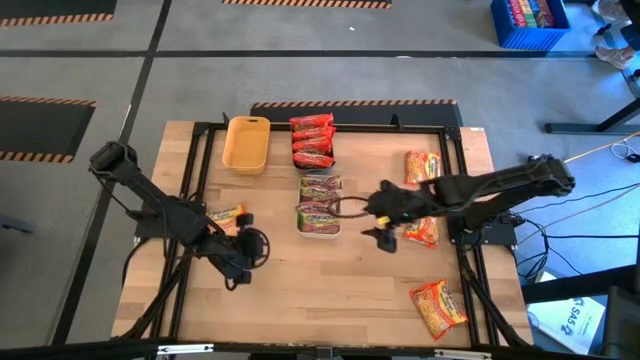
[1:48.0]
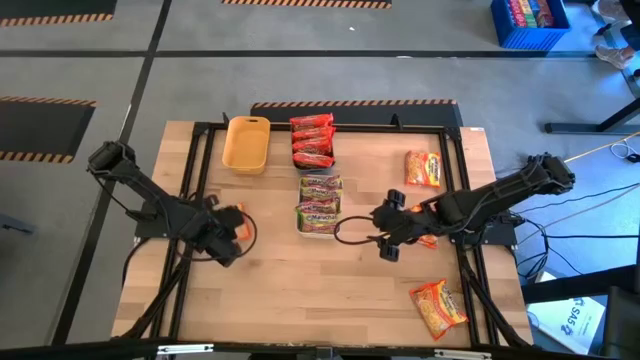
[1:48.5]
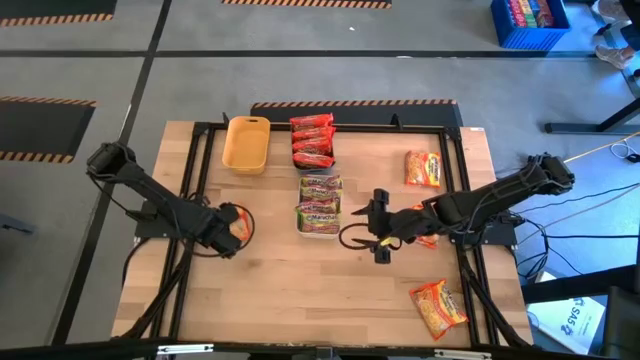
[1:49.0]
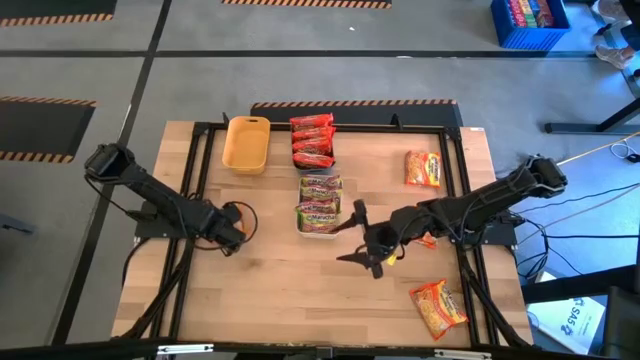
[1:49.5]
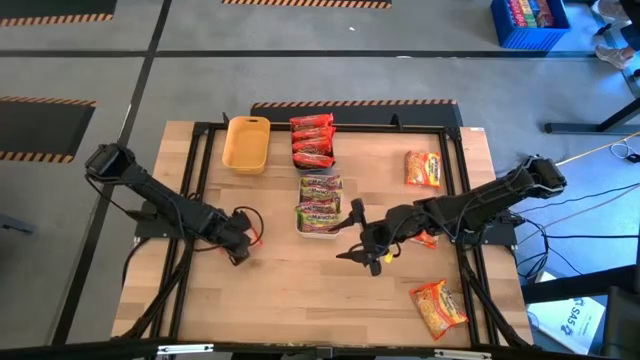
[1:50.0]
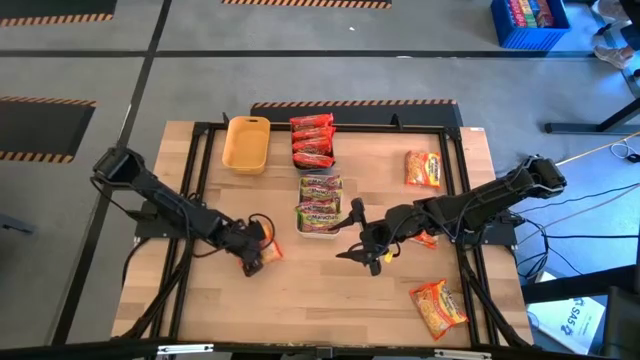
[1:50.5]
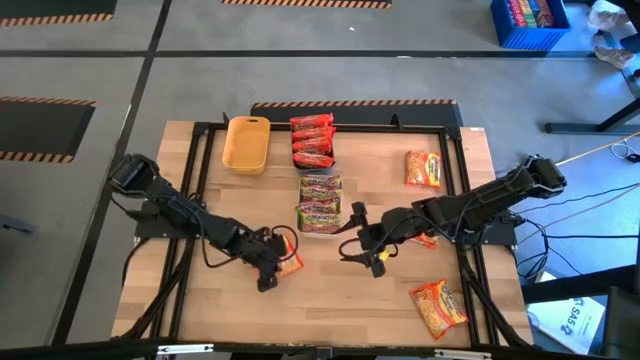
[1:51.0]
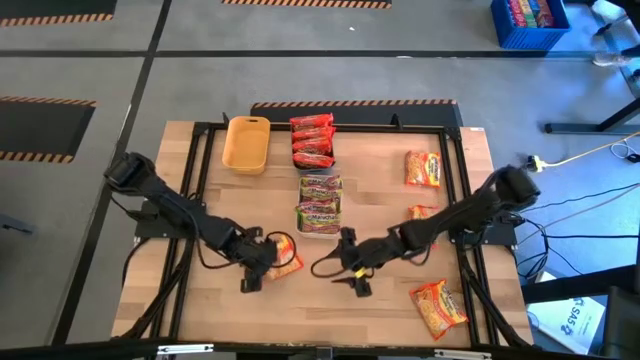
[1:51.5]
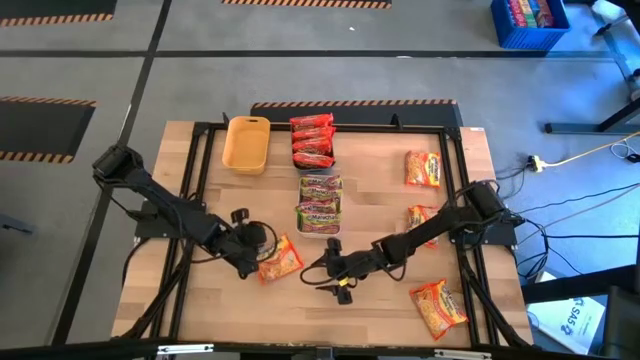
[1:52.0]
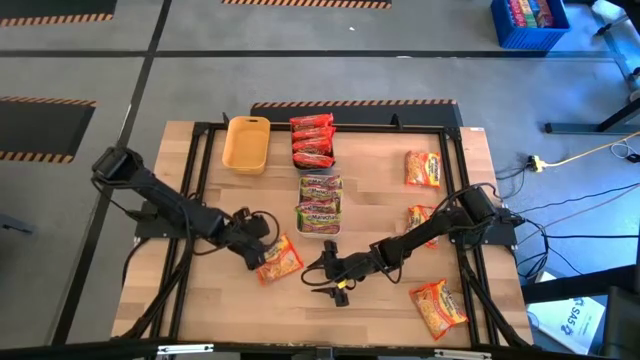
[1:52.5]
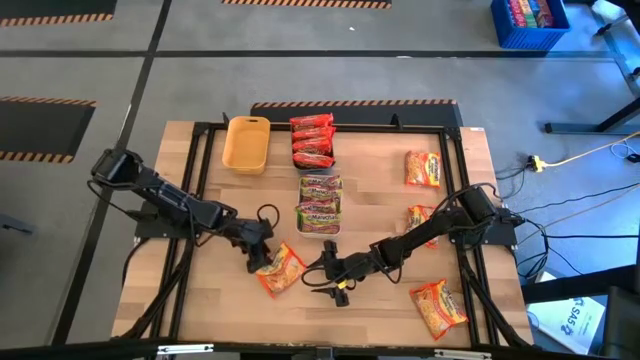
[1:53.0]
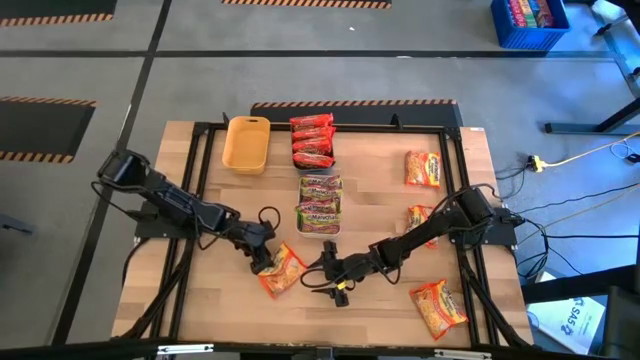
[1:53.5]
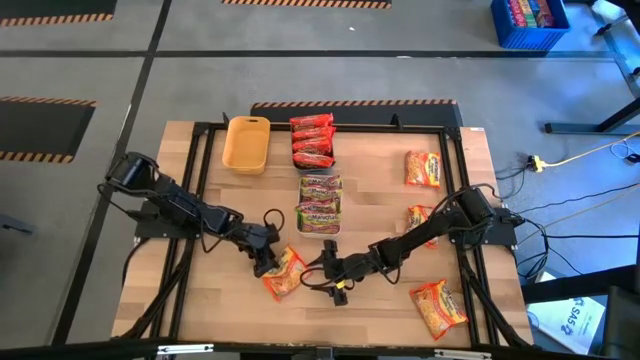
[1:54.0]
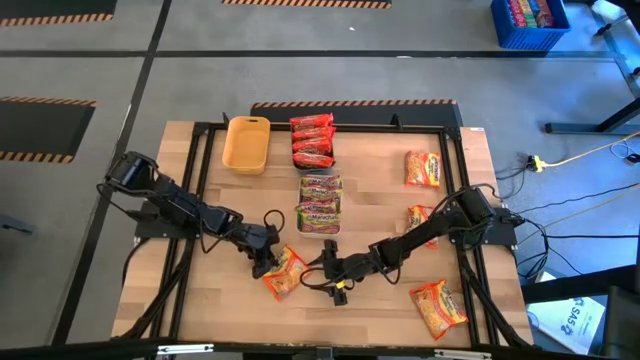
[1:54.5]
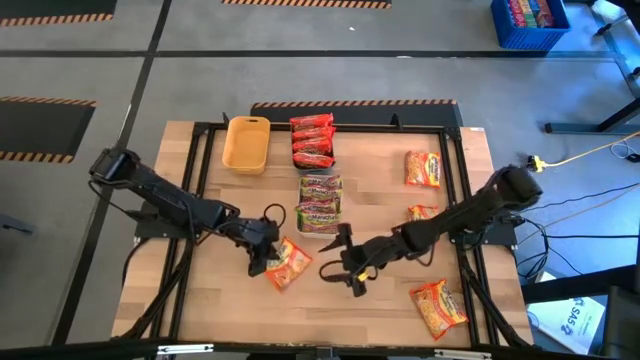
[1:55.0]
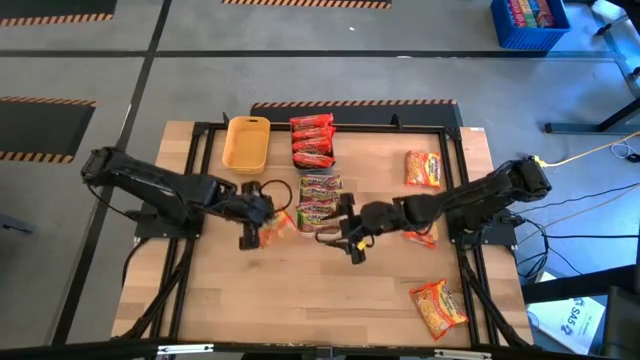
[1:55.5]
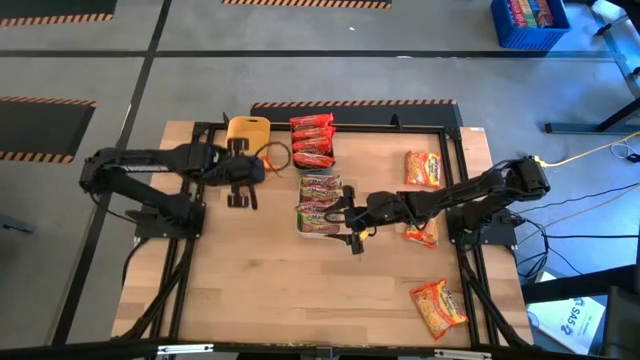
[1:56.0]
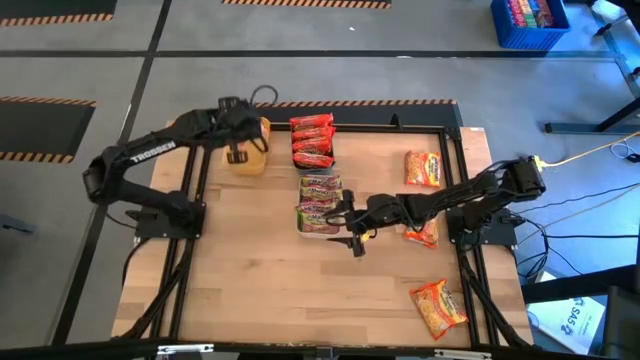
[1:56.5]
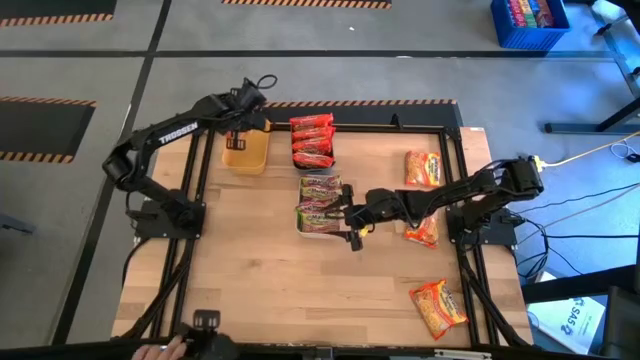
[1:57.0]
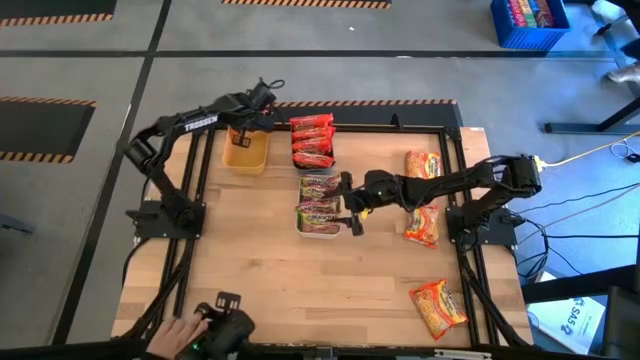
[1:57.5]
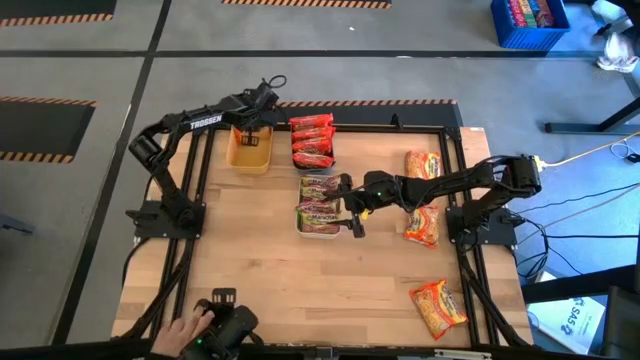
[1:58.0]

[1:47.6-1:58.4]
Task: Sort Maruchan noodles
Put the orange noodle pack into the yellow bin

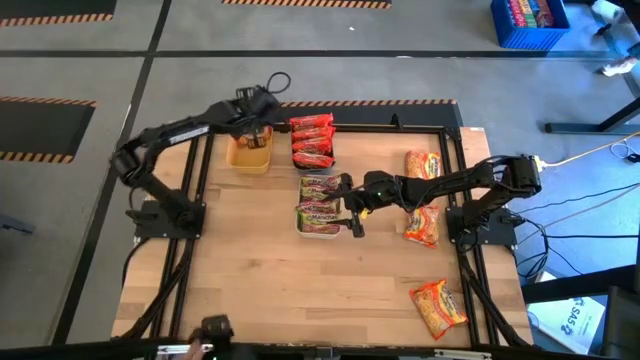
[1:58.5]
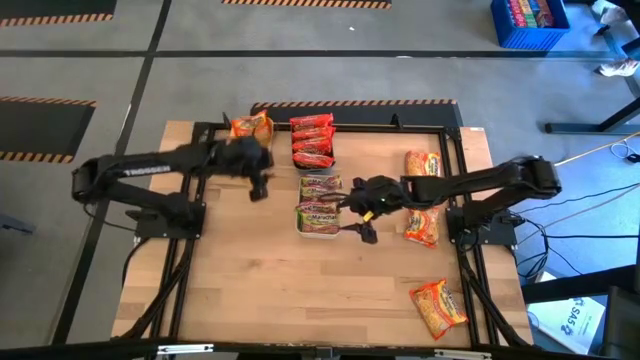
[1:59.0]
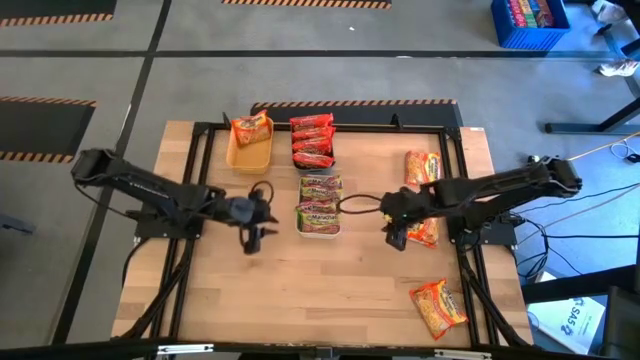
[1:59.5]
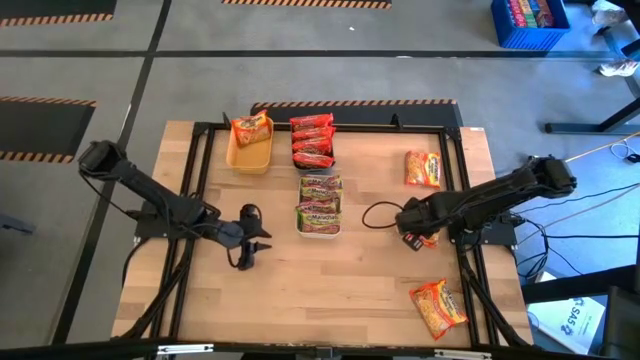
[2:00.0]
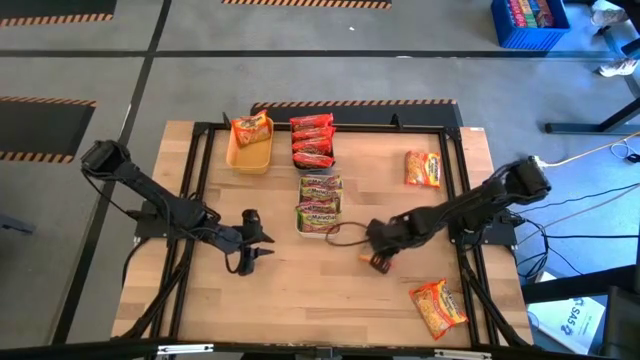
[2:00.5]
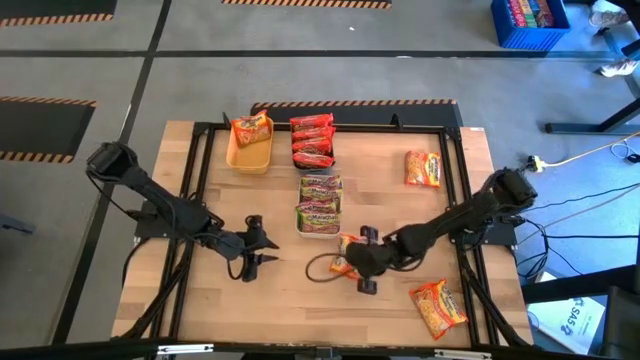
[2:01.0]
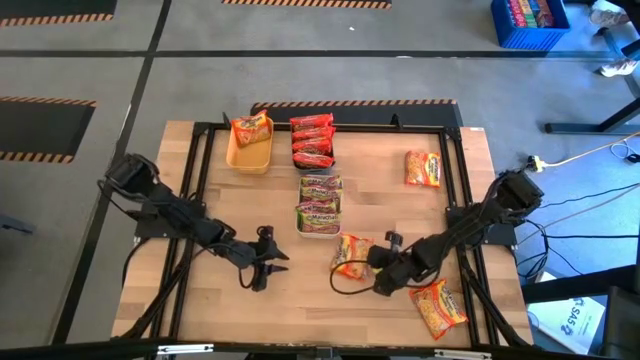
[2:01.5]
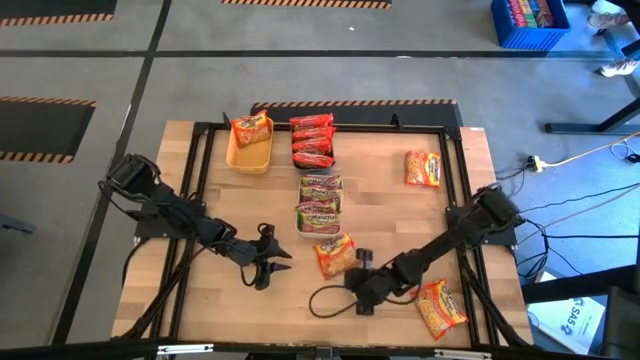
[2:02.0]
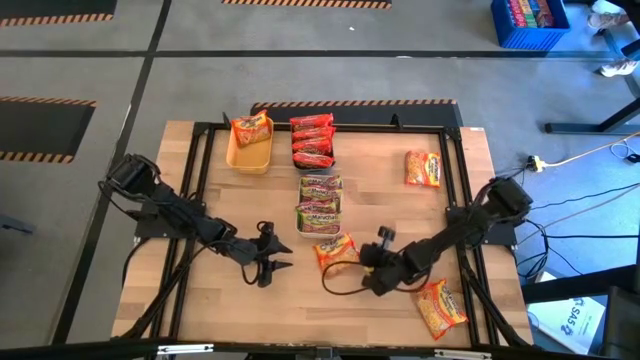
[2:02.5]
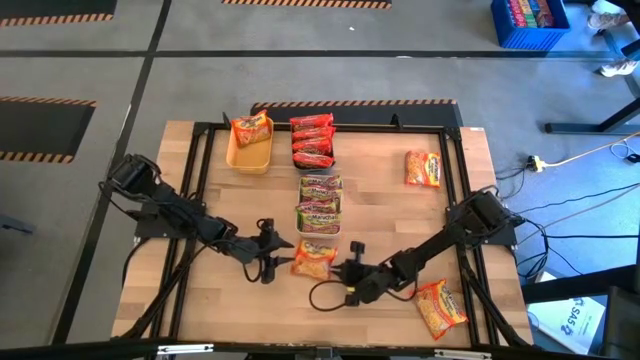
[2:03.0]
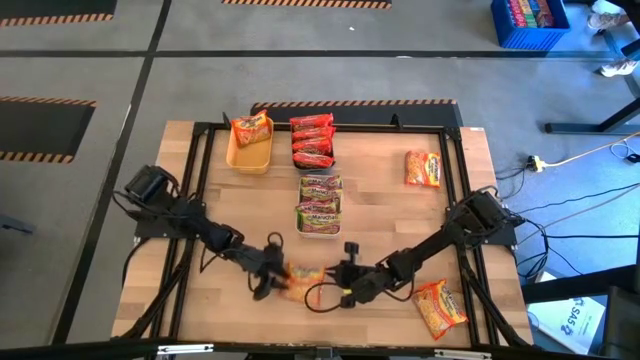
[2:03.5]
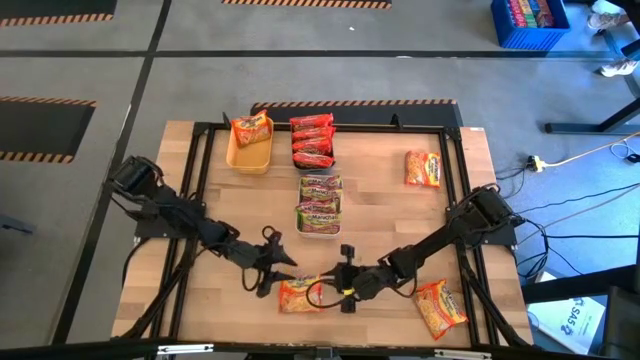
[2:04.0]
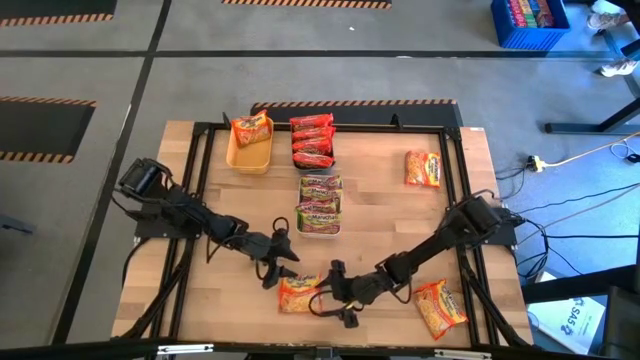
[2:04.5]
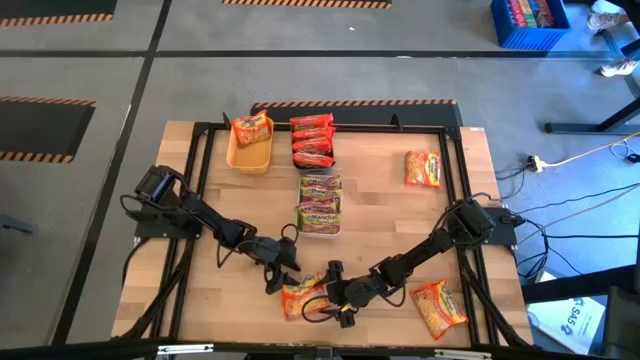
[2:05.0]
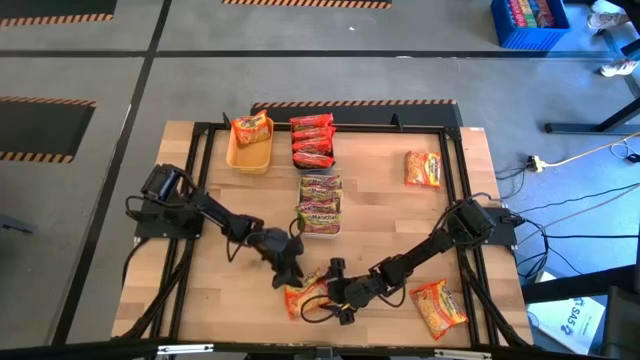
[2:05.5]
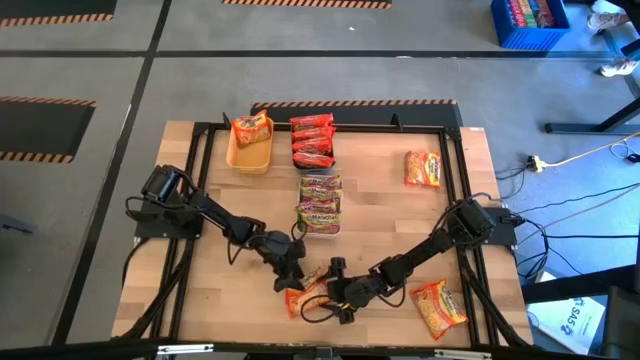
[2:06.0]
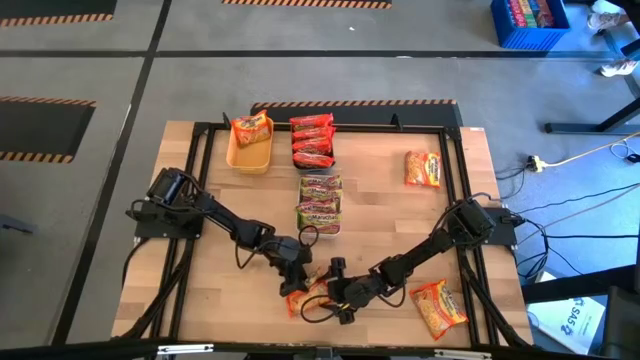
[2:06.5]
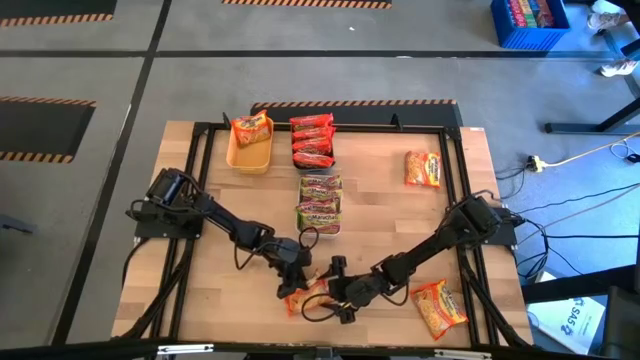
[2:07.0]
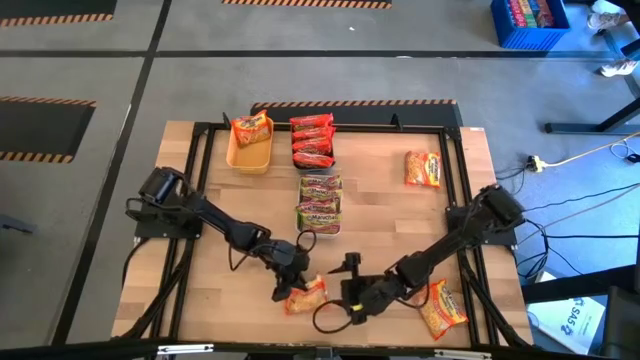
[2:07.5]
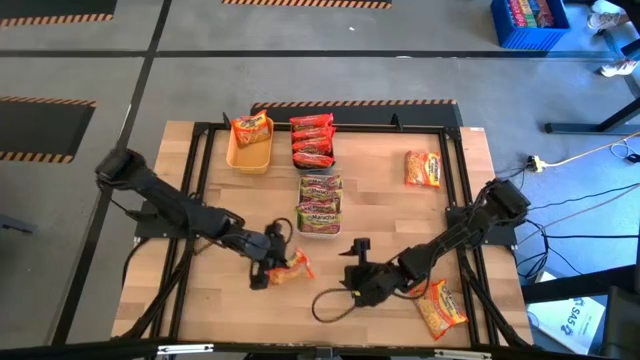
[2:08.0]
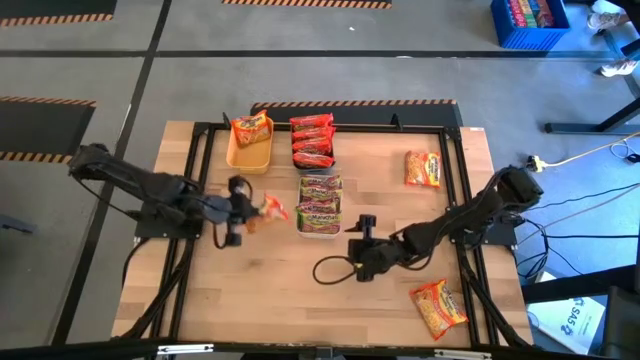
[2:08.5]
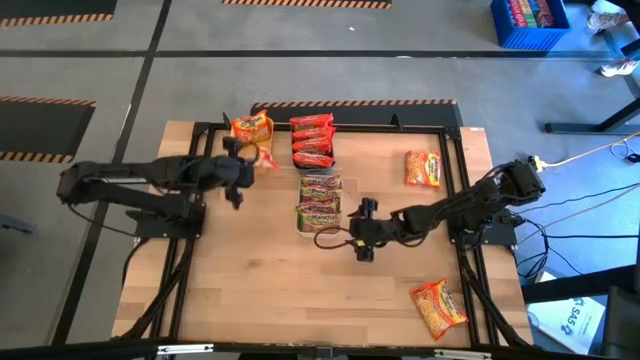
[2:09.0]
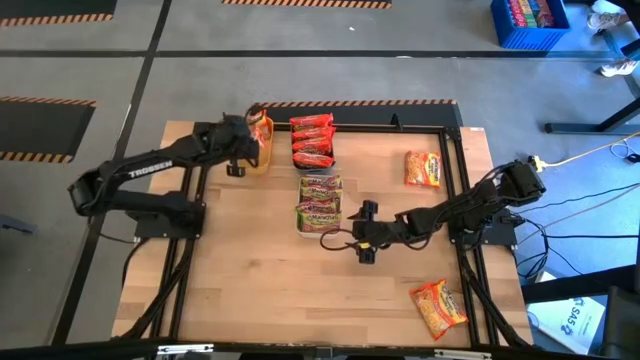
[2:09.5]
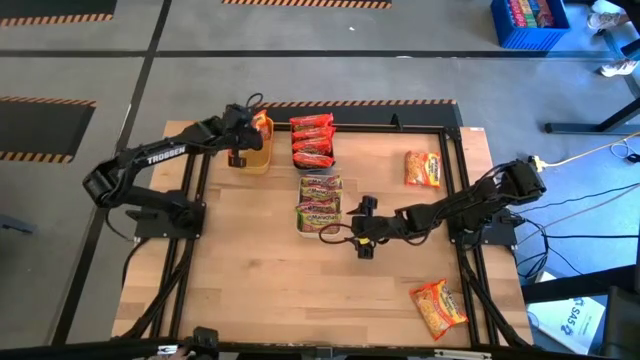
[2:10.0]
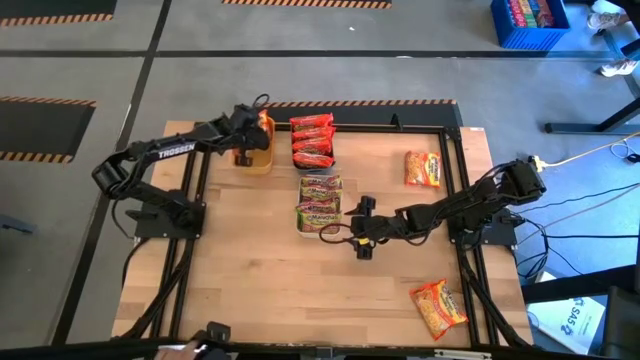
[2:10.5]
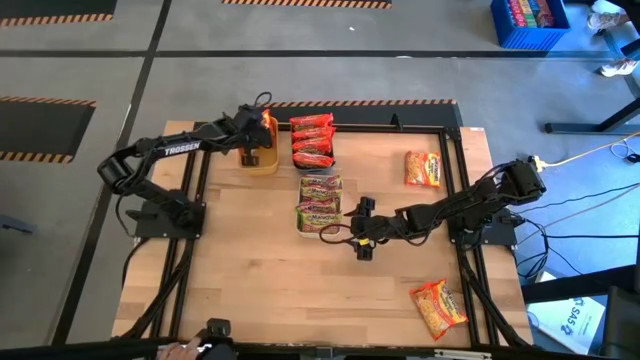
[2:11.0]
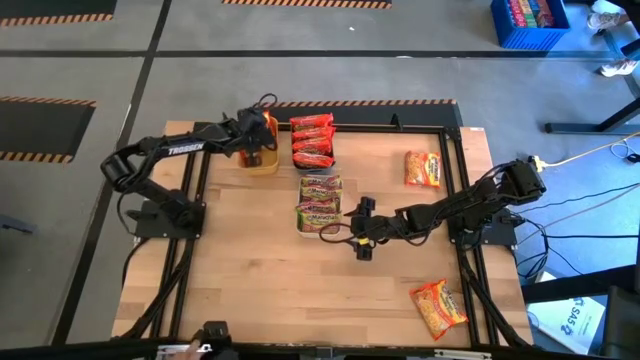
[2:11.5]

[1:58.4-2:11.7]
Put the middle orange noodle pack into the yellow bin
